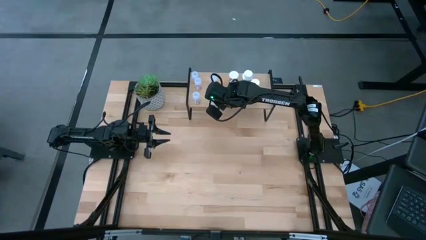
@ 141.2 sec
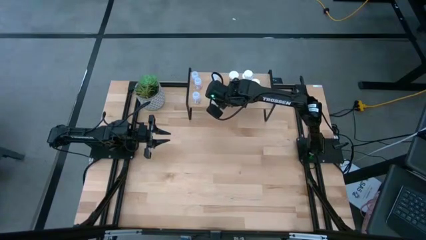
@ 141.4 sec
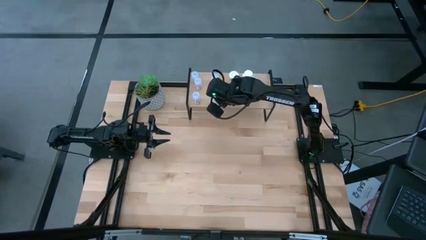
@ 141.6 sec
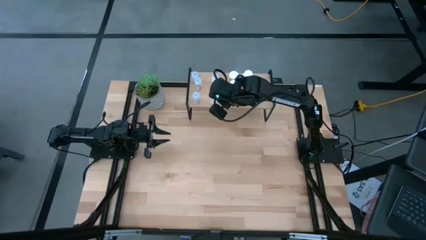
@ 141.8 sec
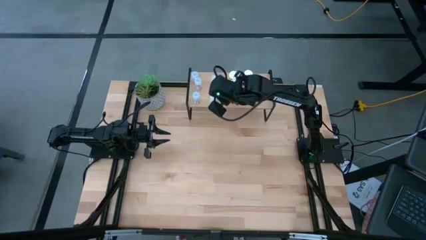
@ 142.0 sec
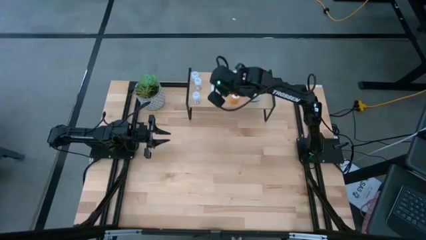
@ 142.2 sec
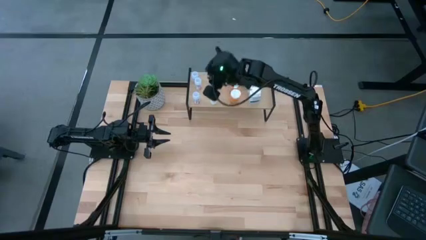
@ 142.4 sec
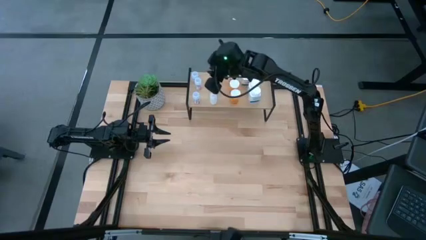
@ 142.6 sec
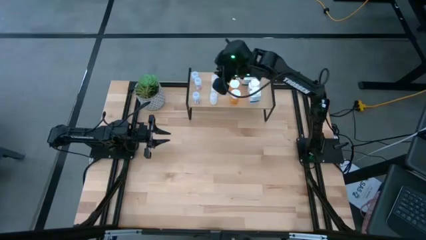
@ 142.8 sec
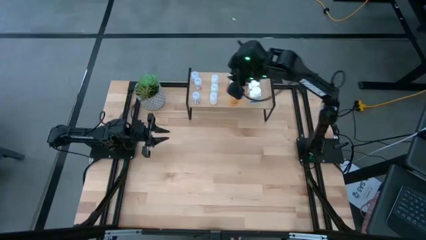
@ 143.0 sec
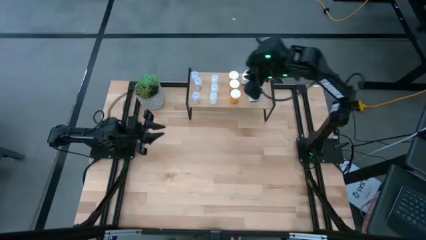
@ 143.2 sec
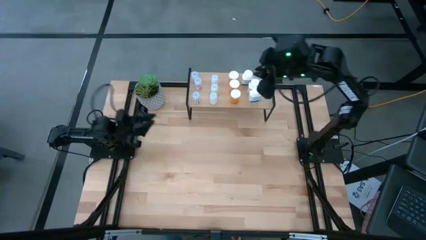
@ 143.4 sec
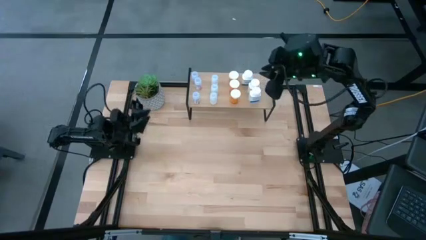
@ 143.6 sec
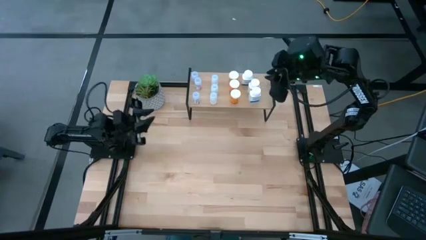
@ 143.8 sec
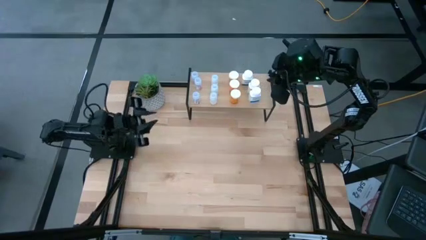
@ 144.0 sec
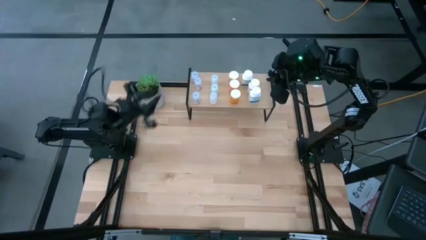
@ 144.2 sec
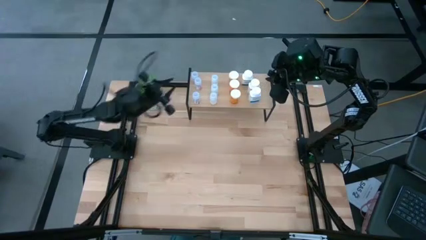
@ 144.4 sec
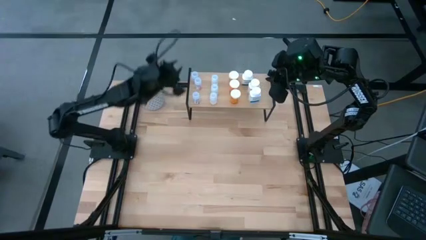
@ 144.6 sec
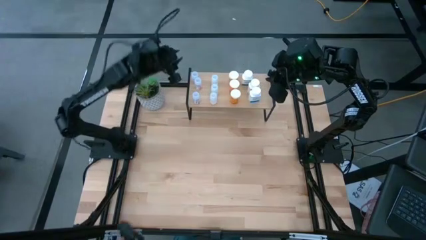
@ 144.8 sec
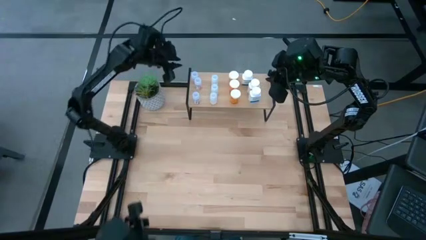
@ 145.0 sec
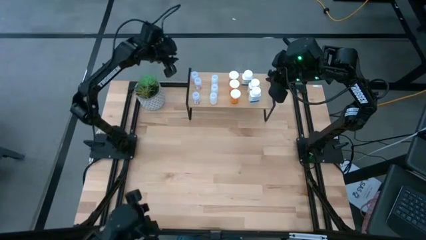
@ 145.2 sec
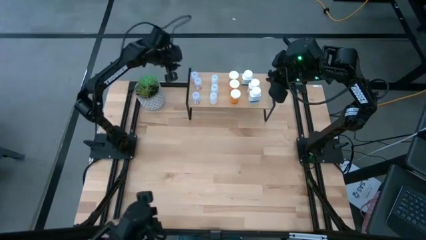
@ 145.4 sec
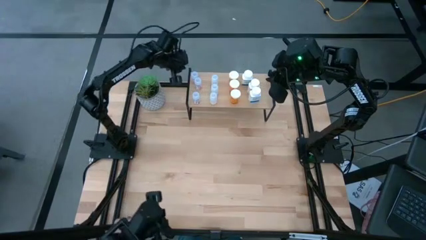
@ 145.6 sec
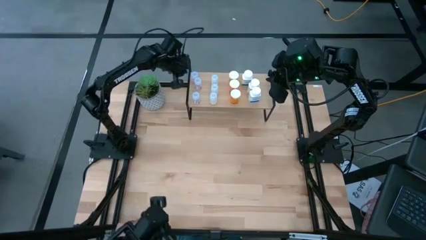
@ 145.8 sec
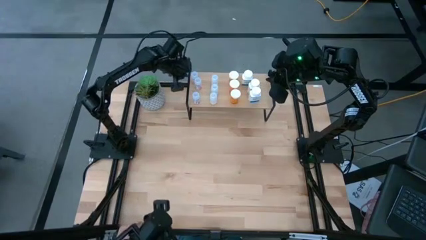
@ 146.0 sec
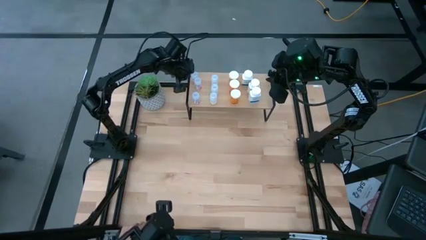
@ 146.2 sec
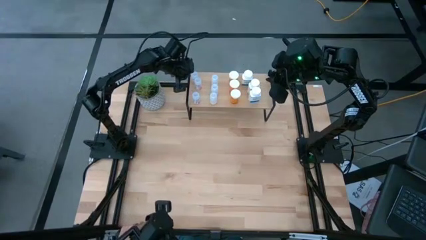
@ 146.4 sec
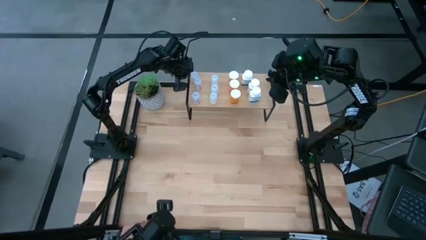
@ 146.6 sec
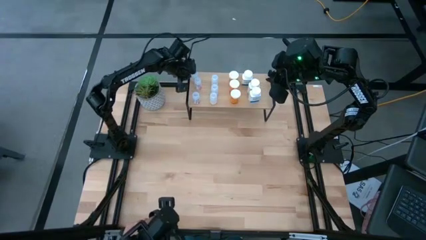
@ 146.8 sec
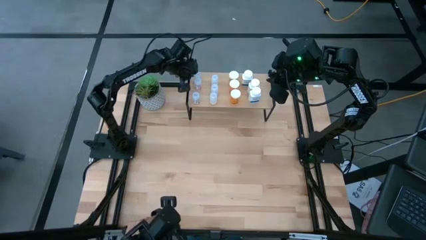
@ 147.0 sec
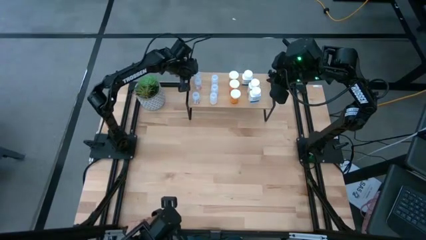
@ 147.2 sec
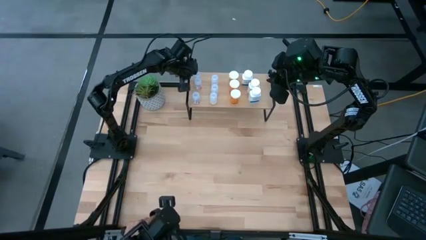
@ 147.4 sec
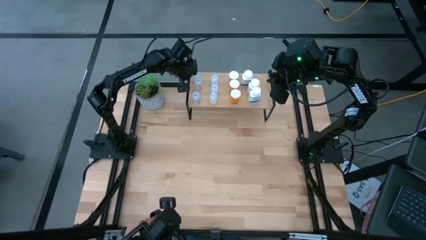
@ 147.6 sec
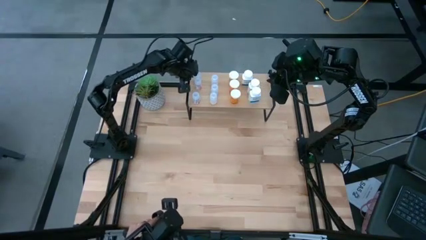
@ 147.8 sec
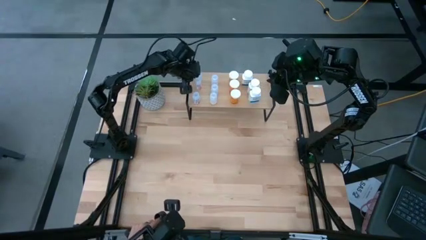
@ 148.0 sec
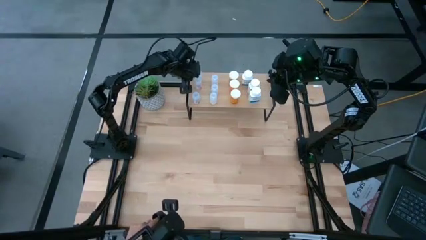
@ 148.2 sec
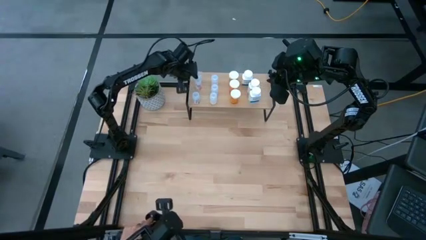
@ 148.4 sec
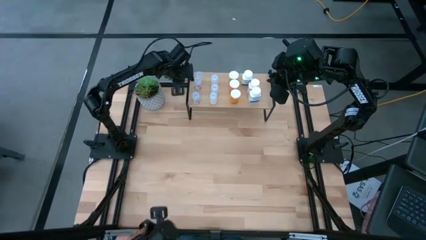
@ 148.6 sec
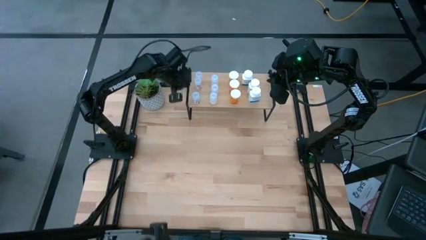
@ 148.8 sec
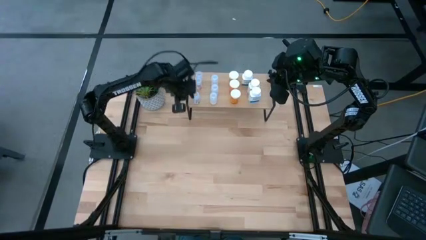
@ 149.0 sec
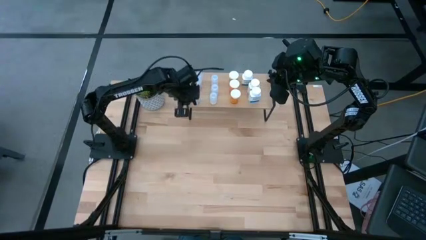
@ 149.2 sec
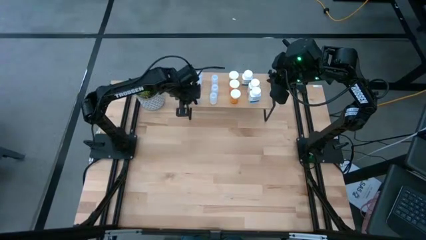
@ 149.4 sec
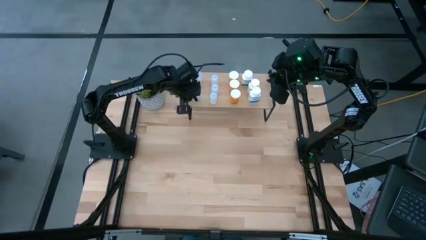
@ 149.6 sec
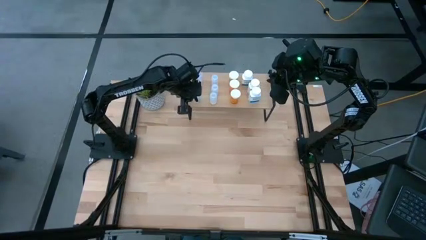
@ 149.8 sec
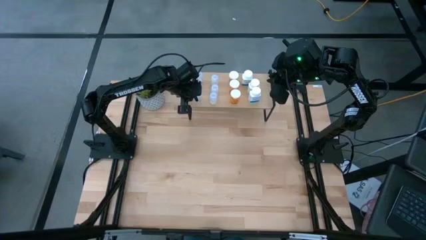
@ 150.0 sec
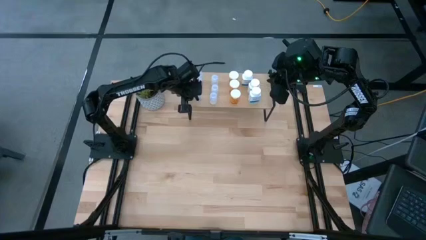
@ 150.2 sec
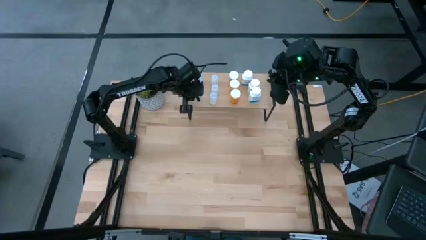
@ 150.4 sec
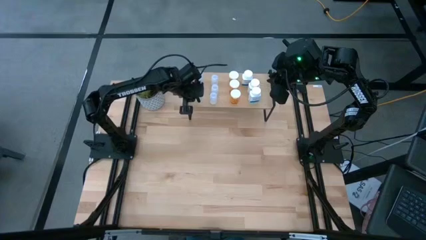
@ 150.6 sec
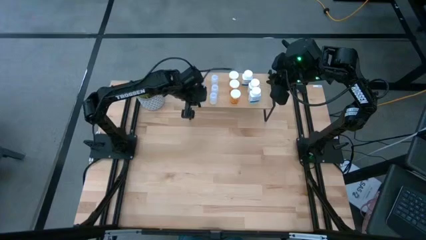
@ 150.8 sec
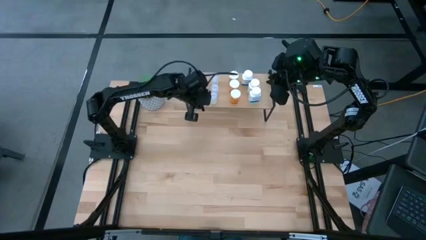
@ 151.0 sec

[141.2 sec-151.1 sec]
Task: Pick and place medicine bottles onto shelf by color
Adjust the pill bottles on the shelf

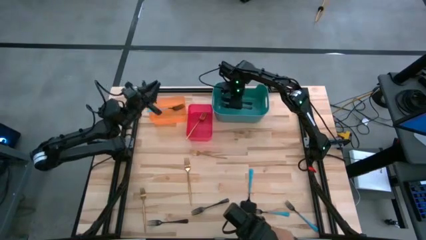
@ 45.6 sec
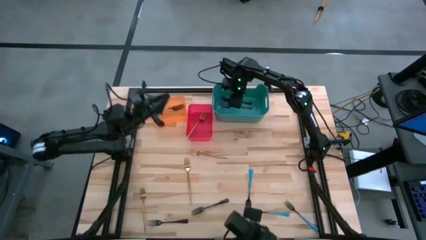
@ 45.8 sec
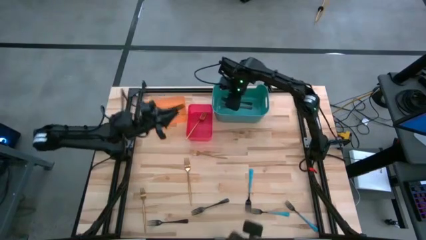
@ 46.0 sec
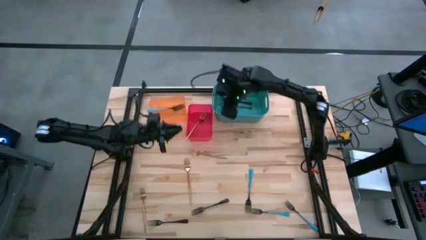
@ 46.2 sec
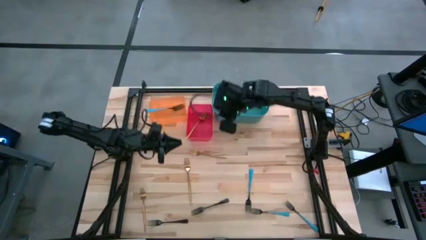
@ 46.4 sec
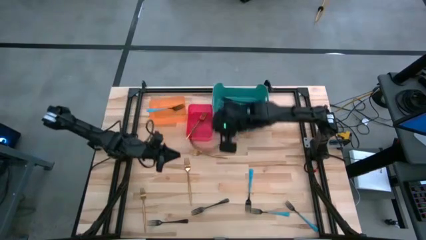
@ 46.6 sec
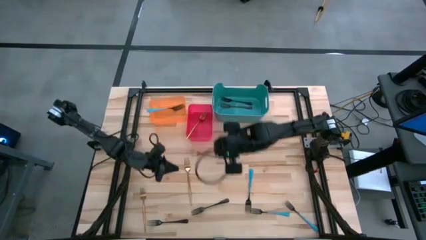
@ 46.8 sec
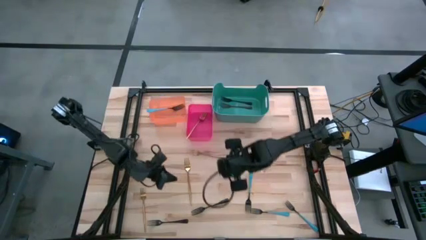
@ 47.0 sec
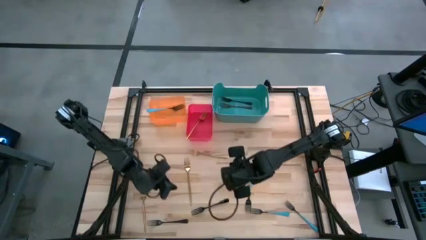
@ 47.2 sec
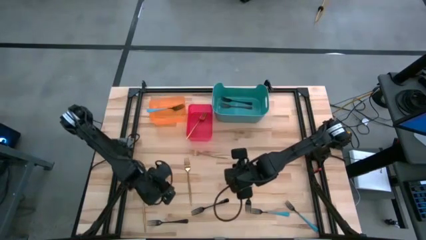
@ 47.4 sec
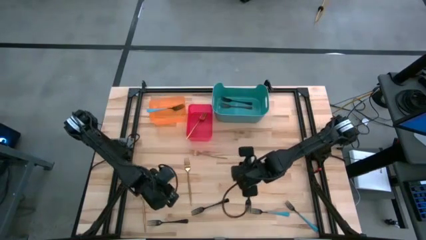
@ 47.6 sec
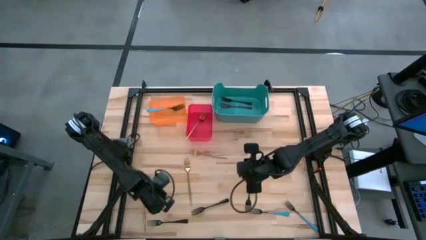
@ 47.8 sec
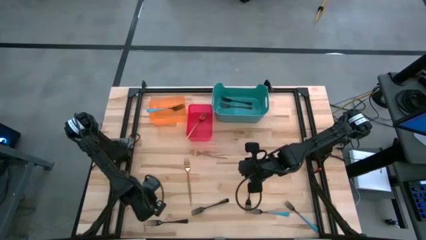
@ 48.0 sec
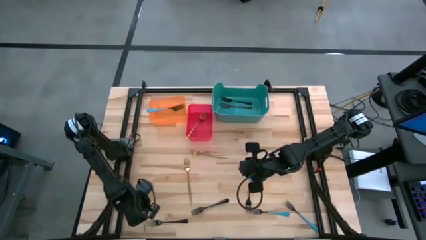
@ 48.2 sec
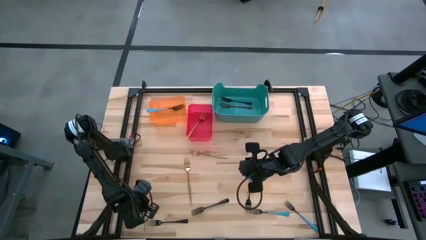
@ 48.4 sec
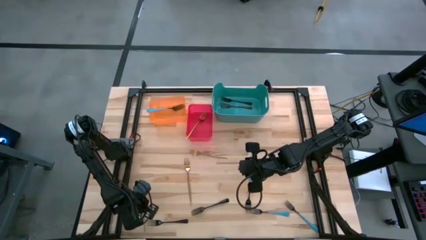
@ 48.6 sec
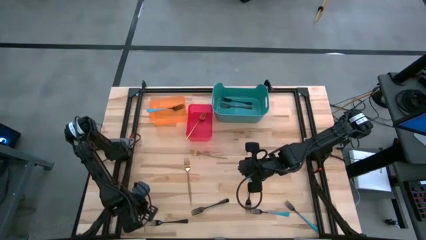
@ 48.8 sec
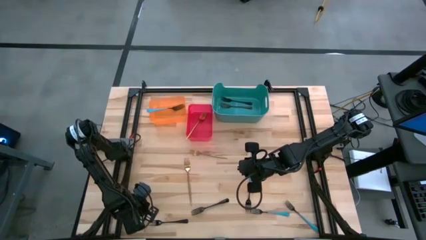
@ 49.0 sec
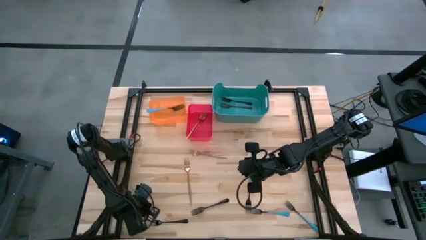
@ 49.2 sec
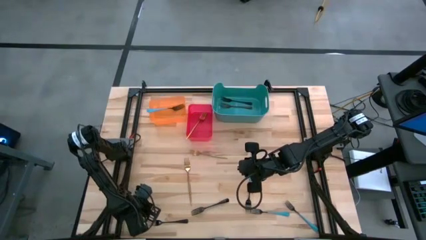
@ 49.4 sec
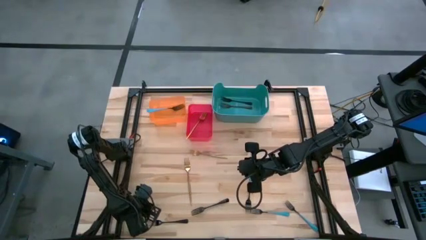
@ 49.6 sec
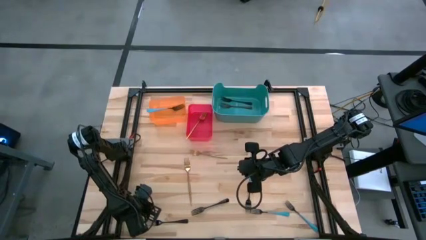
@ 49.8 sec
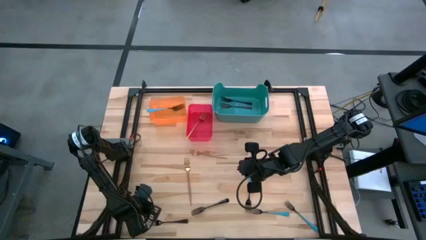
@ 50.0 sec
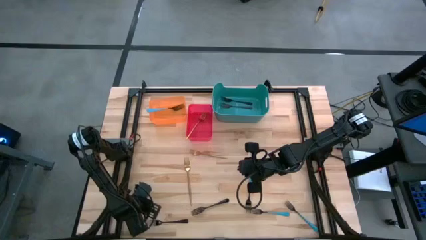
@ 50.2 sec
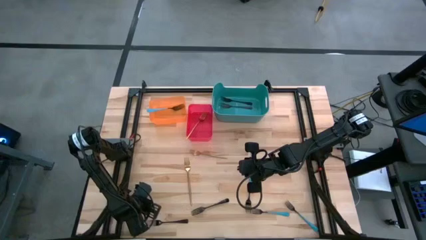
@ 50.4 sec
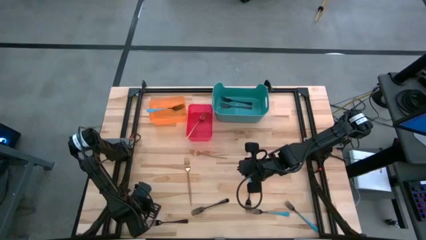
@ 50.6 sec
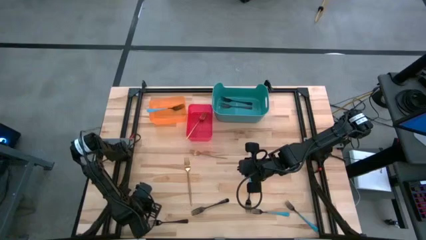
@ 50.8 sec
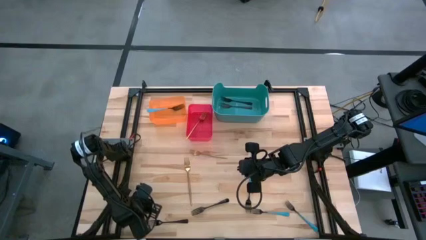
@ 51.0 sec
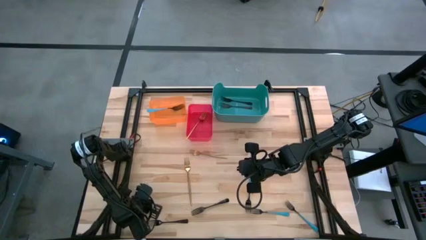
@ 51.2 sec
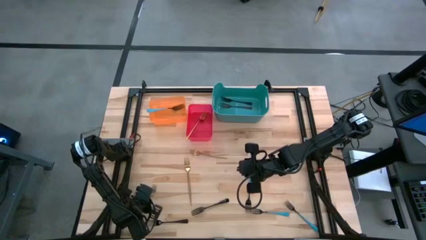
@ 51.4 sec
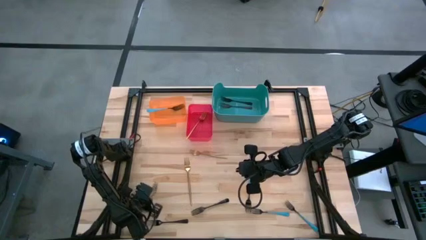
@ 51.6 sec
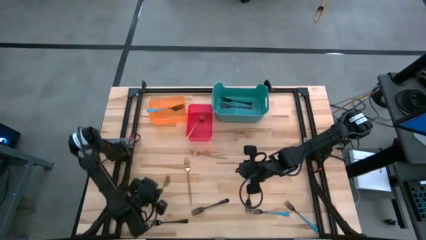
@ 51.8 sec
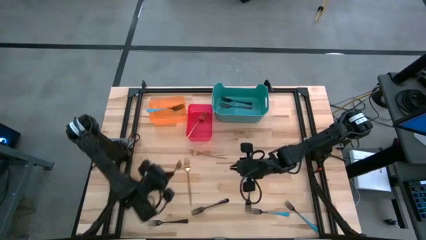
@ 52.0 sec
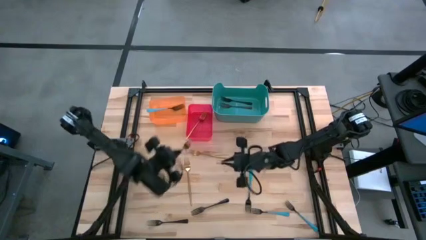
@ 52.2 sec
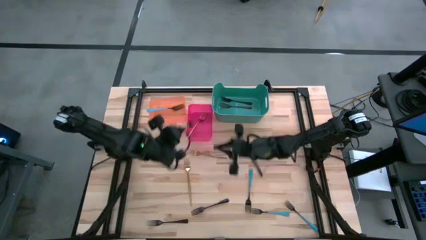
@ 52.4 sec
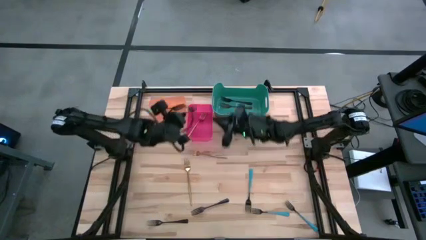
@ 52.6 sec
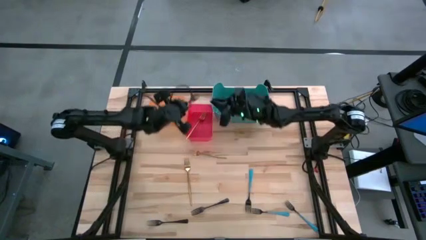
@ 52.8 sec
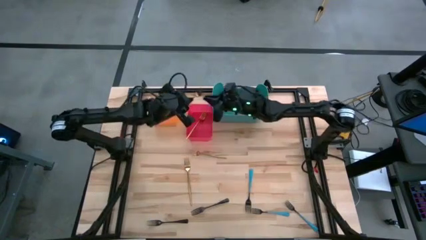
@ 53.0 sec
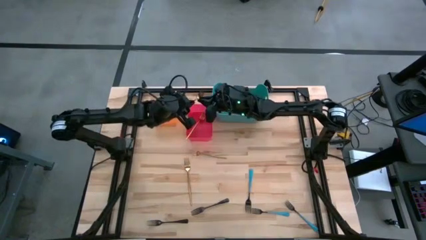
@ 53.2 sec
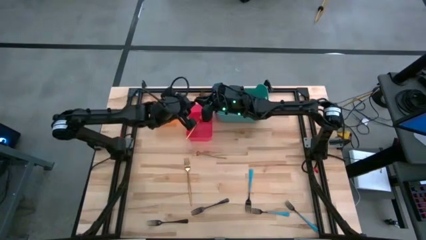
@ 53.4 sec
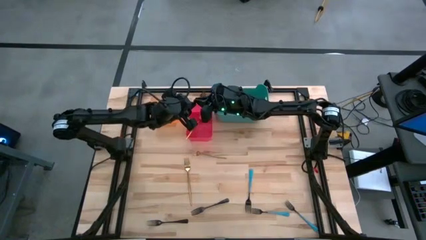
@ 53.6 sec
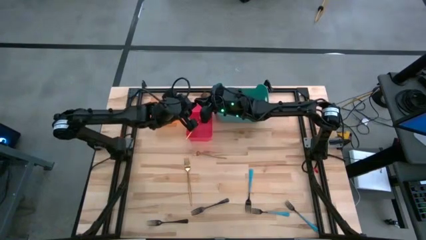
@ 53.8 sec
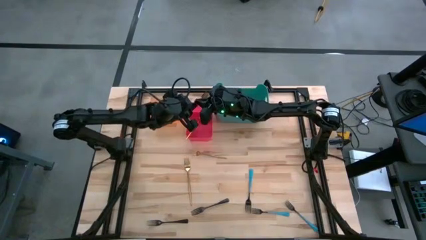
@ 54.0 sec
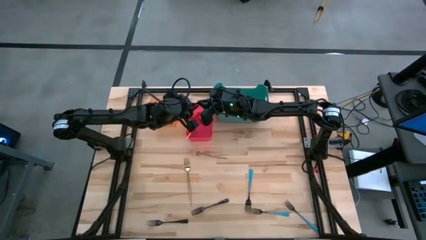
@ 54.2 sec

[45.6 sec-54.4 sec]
Task: Sort silverware by color (type)
Put the gold fork into the red bin
